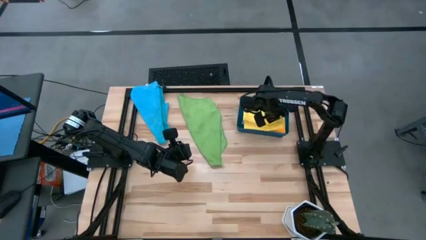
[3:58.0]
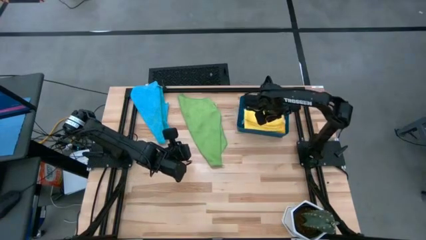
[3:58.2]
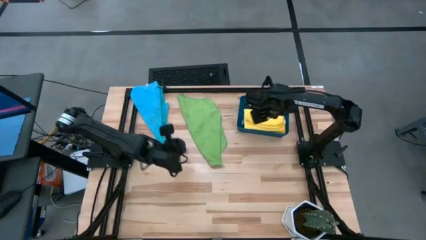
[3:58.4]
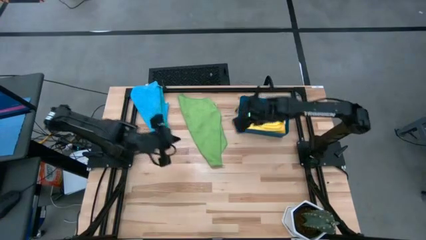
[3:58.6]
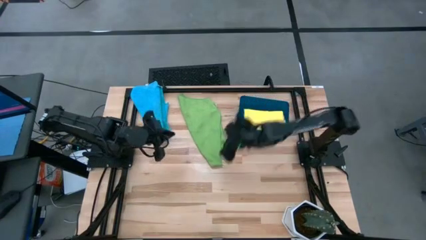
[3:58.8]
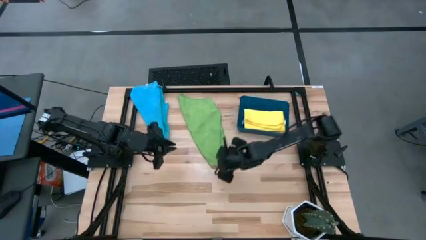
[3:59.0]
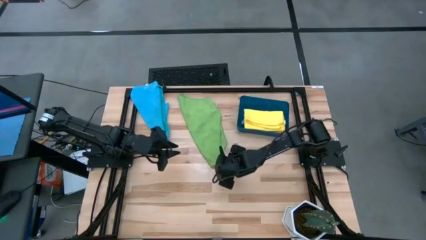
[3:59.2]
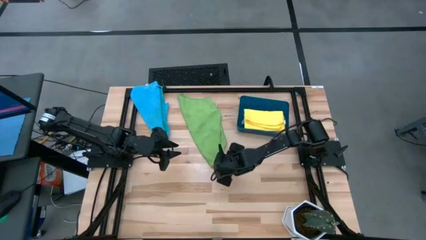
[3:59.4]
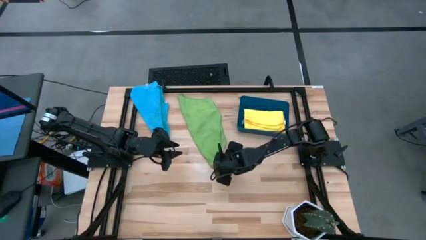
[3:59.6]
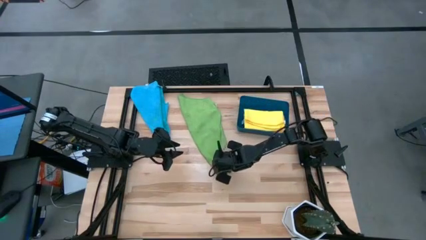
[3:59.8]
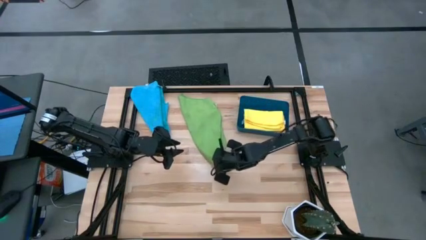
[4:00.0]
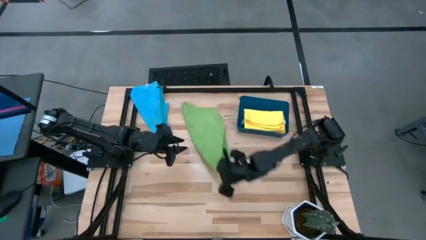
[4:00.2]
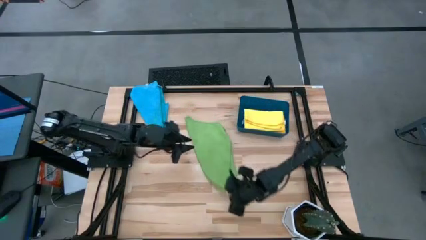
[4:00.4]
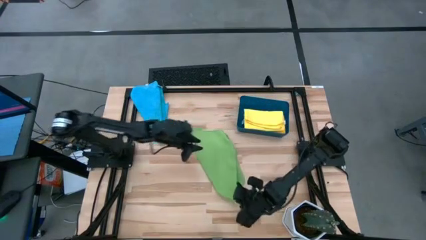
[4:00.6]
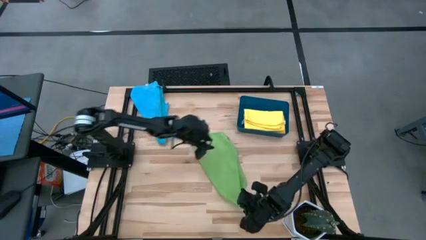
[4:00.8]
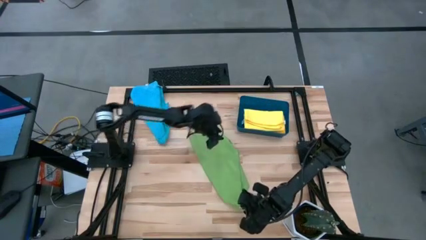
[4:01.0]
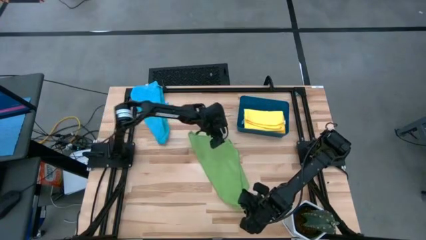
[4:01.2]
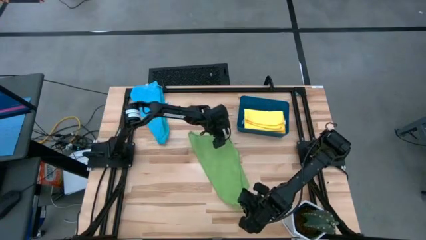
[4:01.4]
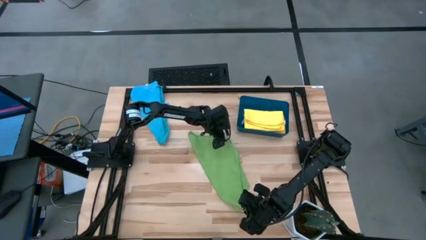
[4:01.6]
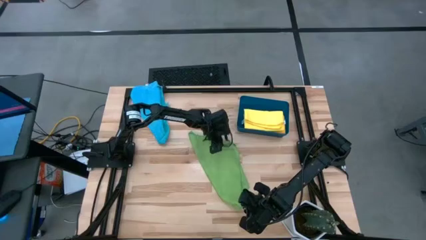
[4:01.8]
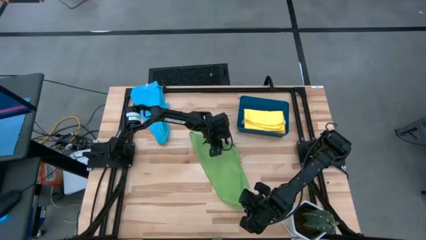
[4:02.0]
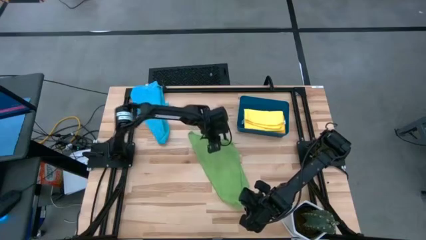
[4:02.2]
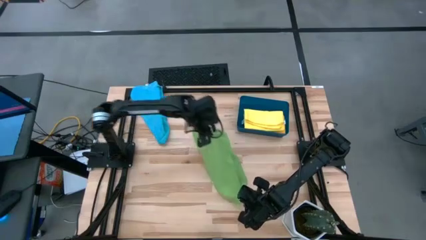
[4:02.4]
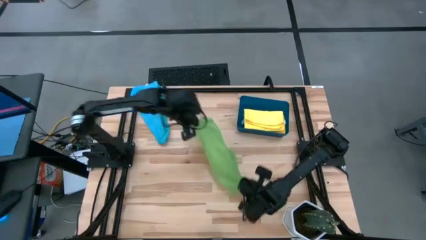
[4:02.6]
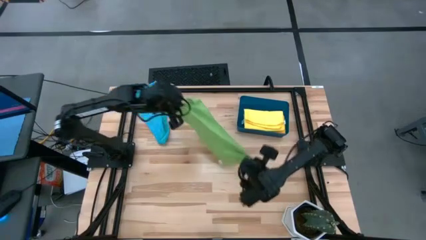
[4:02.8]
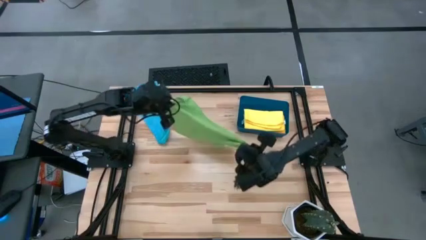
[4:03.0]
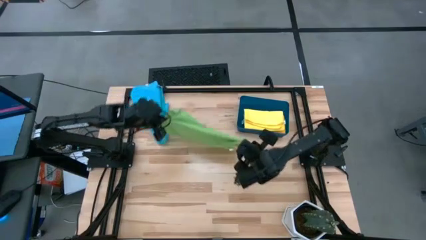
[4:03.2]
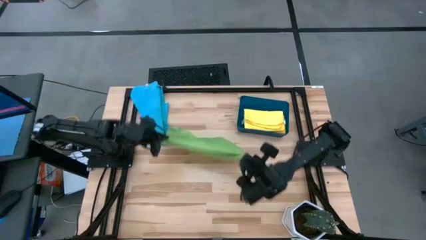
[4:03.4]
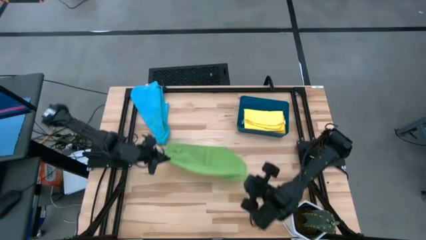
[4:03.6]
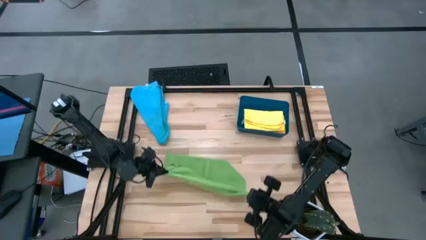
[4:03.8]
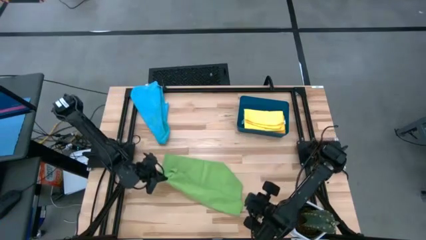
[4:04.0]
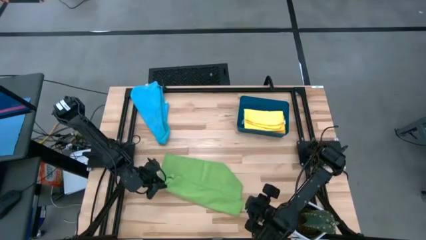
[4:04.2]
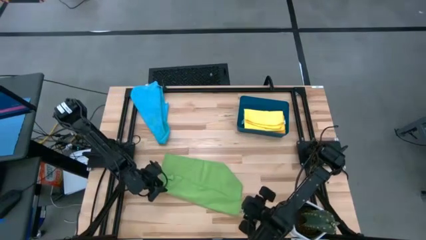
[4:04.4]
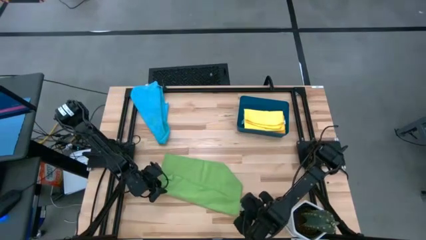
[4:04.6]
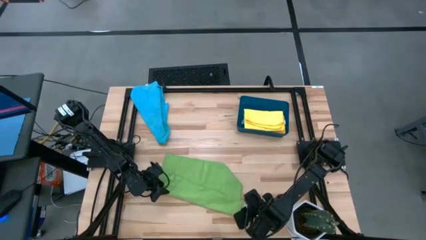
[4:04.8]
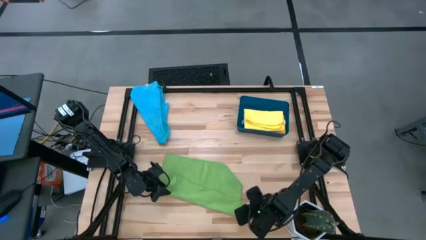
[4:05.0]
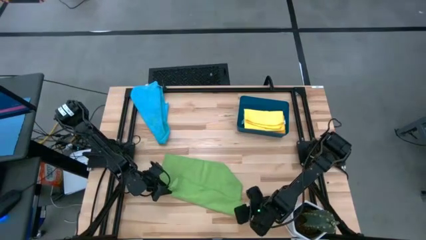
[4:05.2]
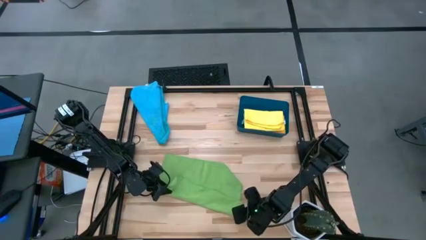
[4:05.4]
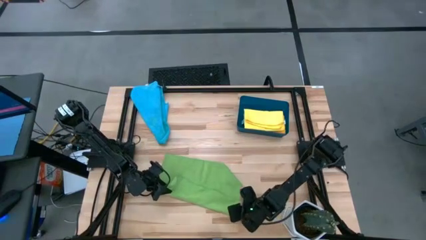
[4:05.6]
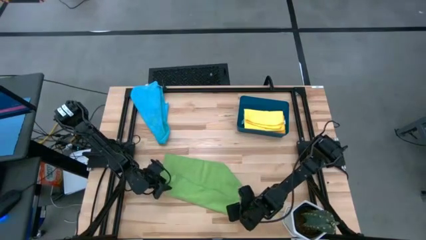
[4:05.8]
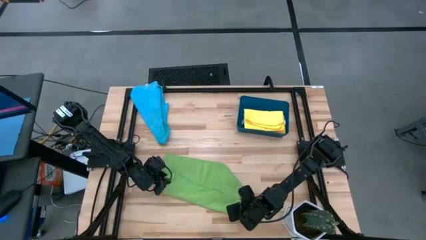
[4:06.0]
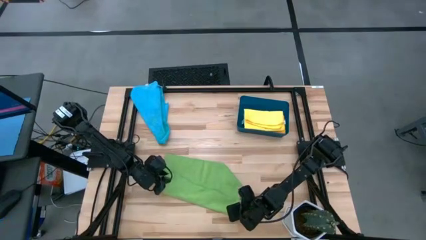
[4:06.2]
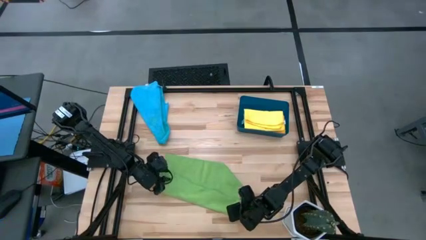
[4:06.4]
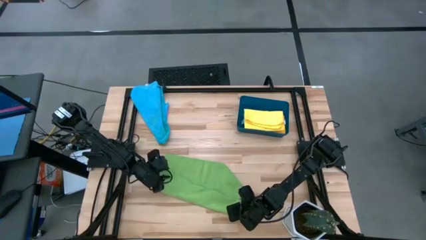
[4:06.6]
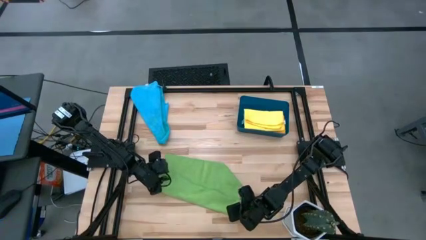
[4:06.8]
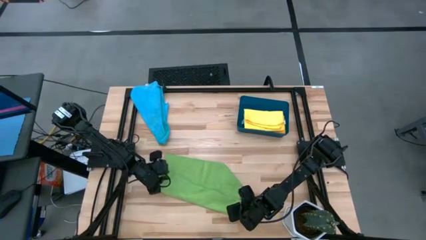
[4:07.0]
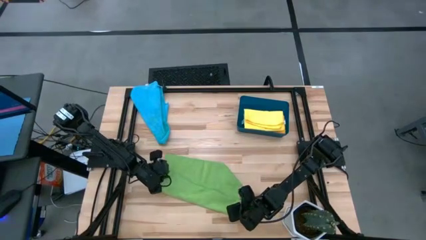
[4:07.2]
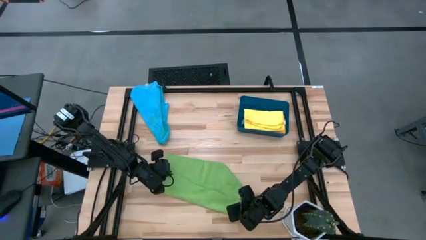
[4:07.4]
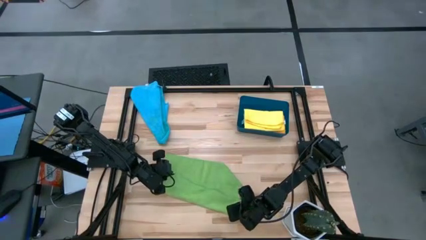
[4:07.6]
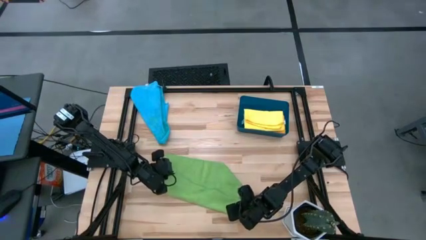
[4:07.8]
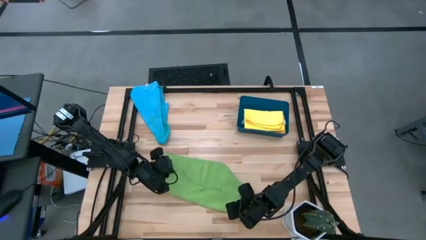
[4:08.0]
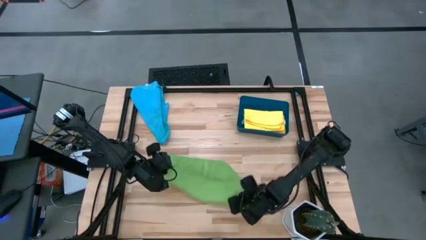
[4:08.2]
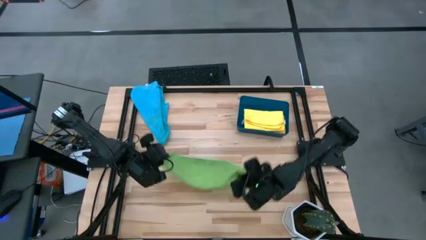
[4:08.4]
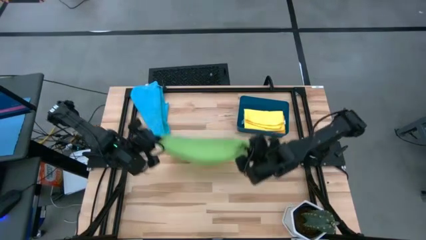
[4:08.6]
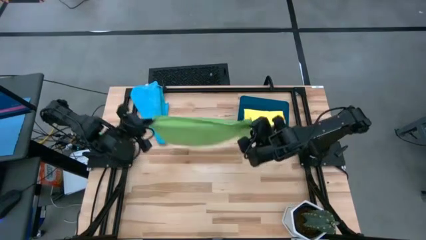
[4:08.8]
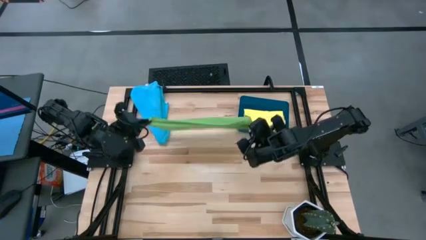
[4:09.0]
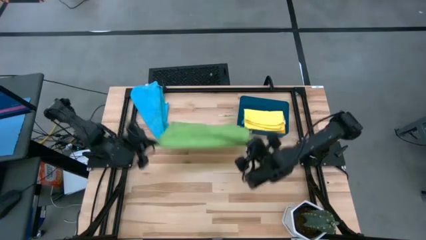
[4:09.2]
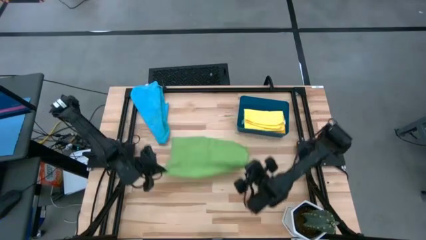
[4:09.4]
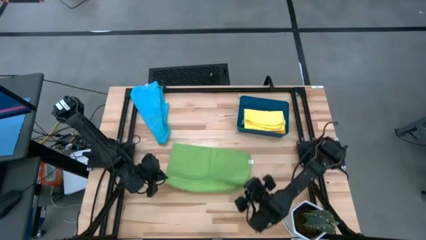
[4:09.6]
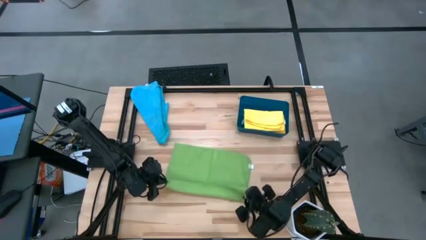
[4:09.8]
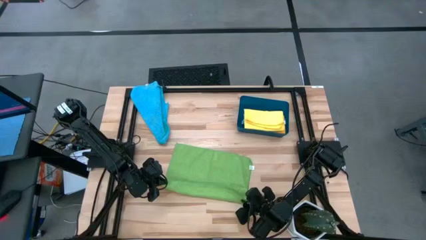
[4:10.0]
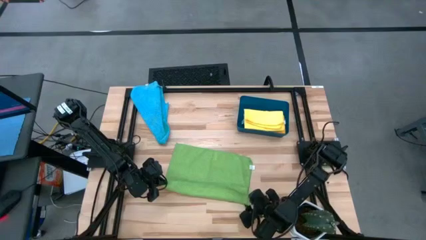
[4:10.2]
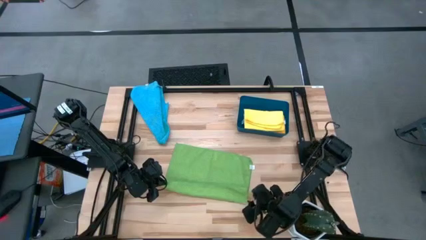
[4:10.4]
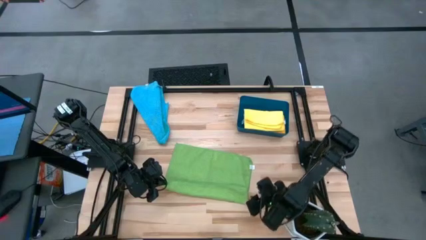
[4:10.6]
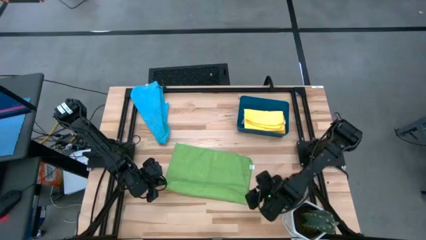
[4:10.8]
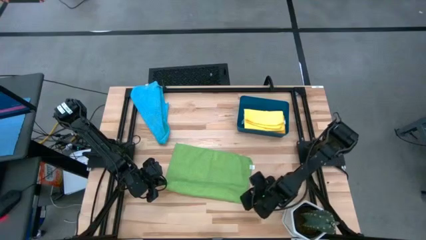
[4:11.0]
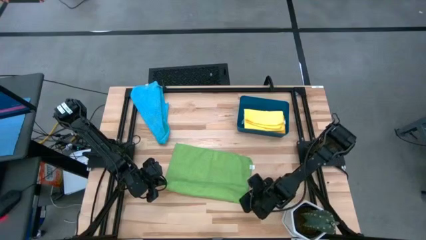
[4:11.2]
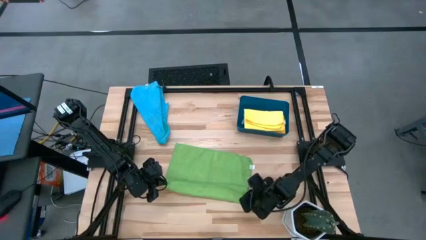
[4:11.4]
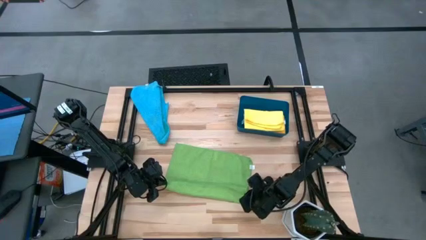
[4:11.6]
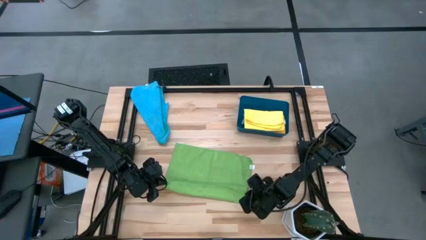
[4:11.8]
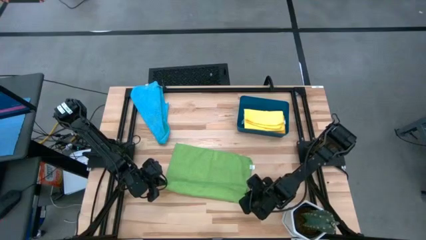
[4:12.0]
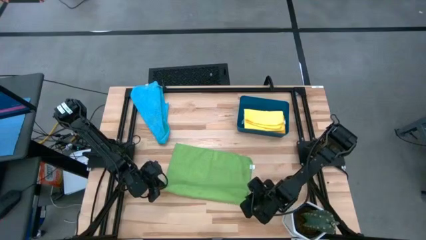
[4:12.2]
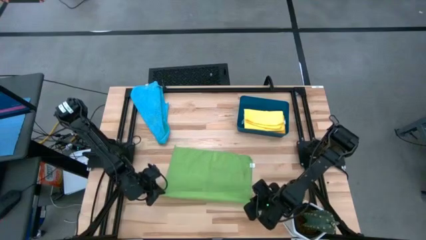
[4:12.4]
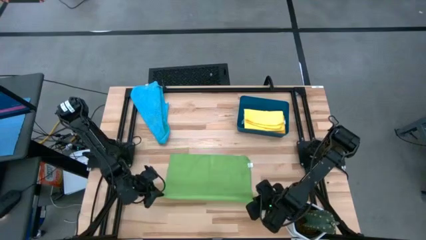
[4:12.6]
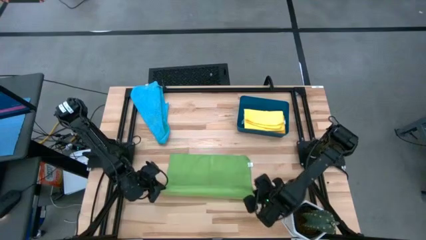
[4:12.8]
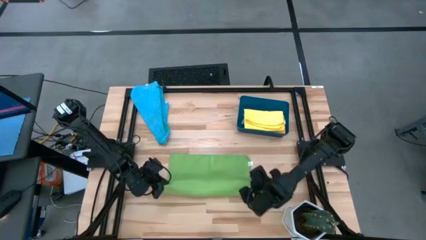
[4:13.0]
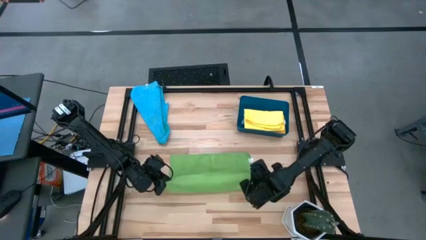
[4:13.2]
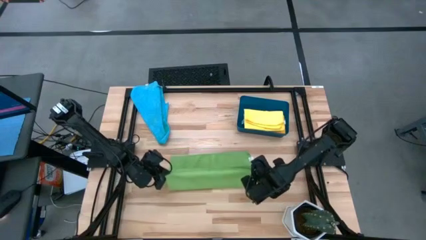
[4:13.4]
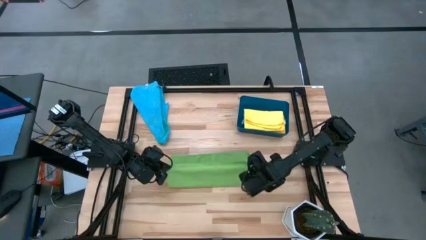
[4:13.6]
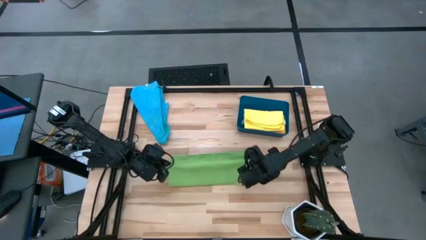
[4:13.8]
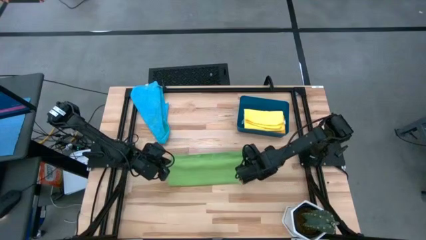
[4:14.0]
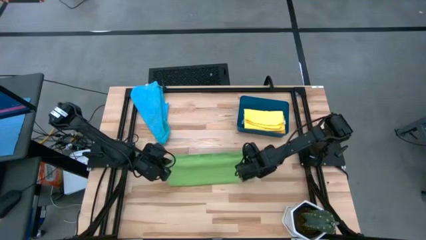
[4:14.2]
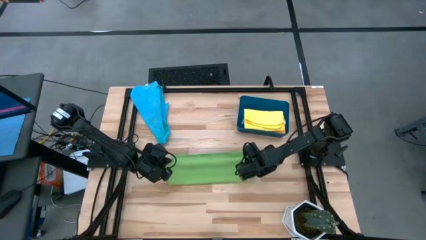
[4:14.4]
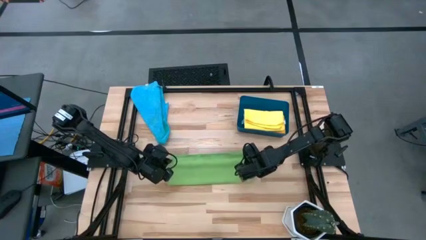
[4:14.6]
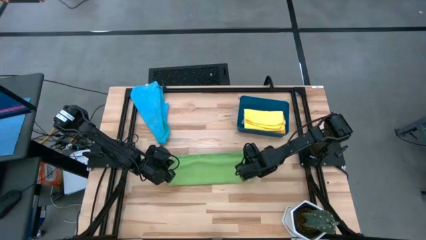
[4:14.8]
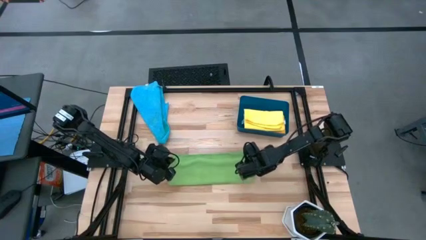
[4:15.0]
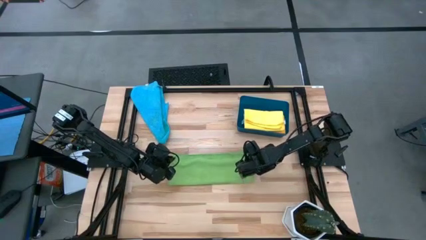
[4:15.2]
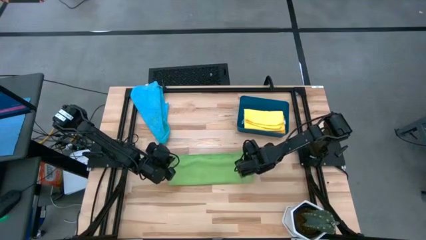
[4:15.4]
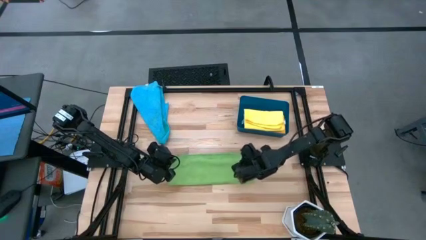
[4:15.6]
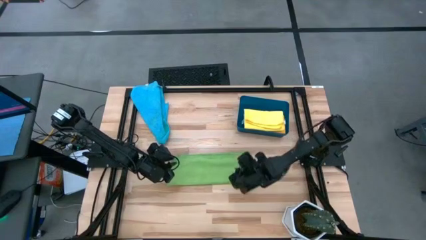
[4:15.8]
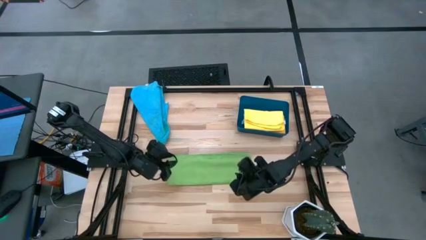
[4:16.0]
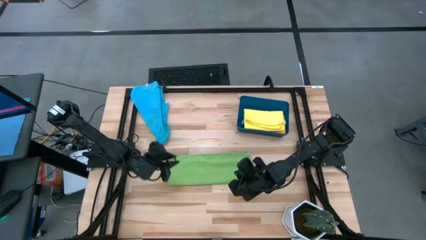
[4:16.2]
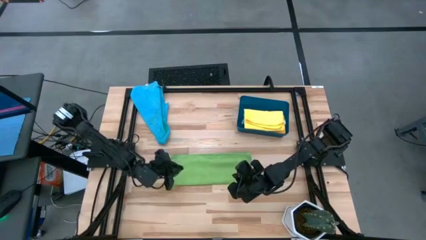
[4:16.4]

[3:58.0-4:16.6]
Task: Fold microfiber towels
Fold the green microfiber cloth
